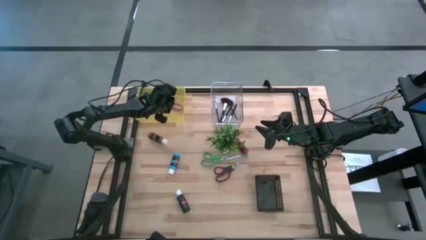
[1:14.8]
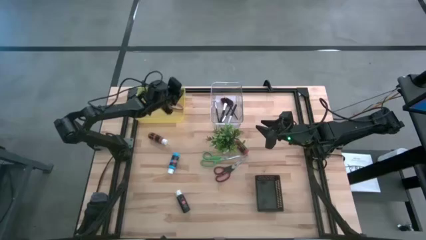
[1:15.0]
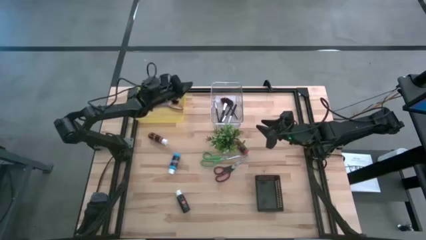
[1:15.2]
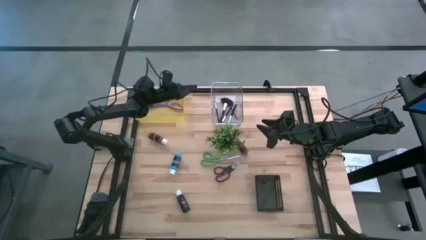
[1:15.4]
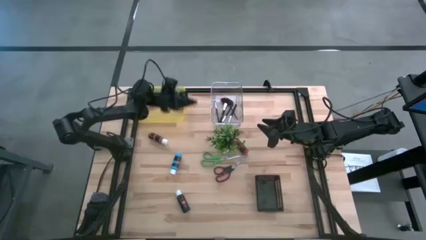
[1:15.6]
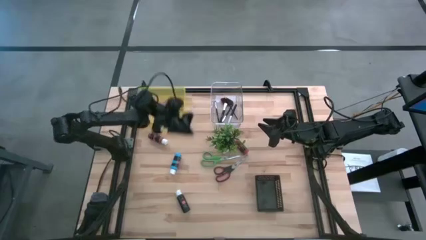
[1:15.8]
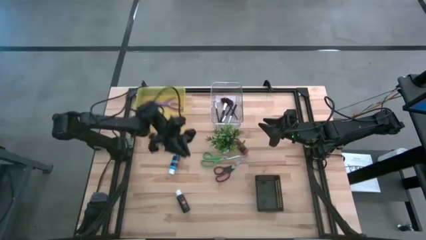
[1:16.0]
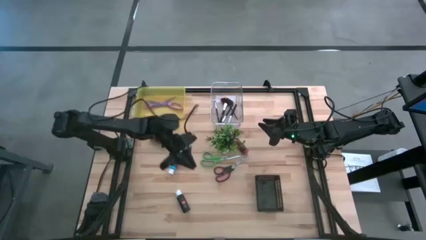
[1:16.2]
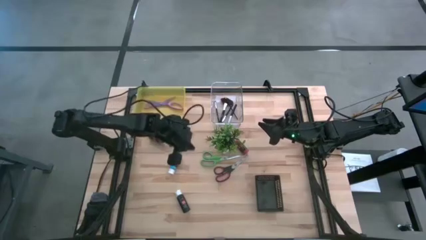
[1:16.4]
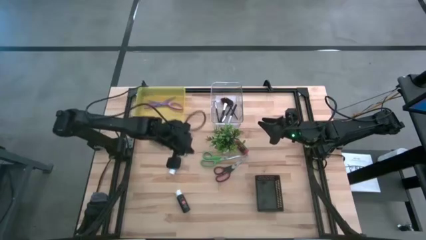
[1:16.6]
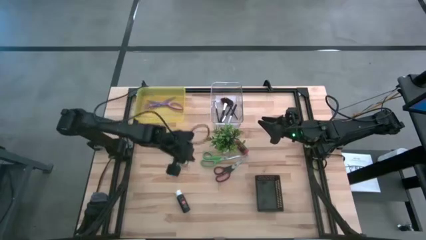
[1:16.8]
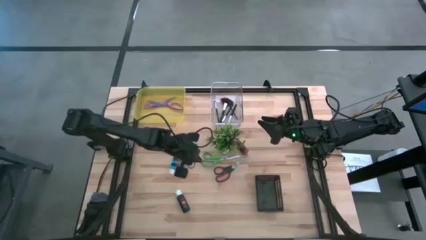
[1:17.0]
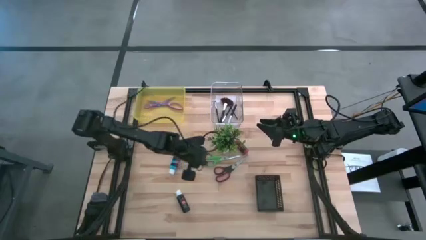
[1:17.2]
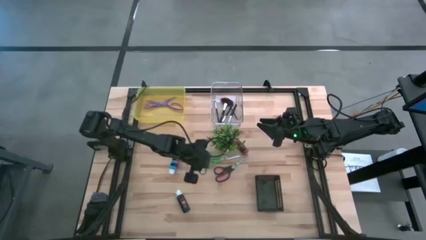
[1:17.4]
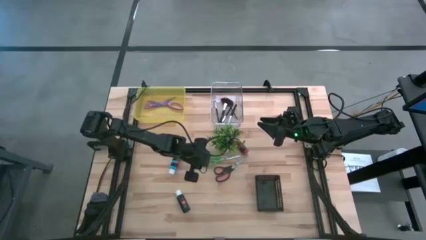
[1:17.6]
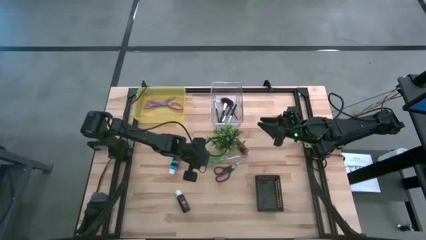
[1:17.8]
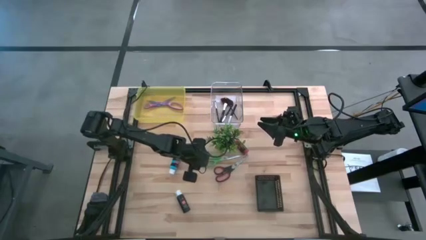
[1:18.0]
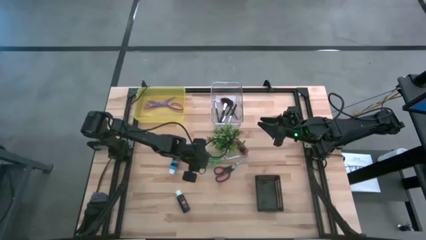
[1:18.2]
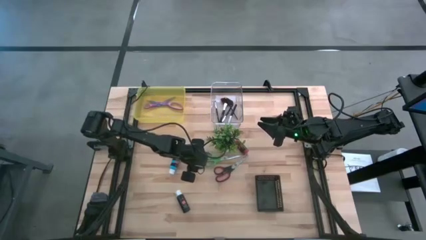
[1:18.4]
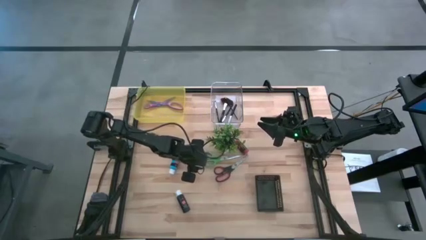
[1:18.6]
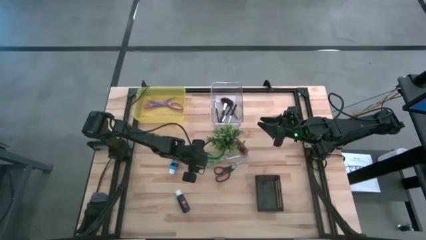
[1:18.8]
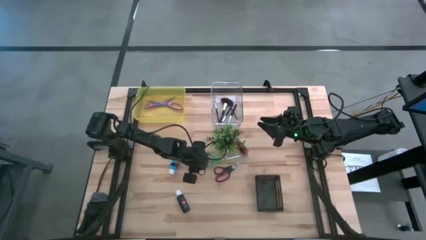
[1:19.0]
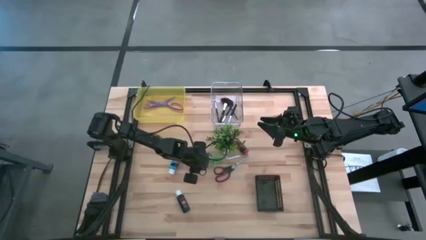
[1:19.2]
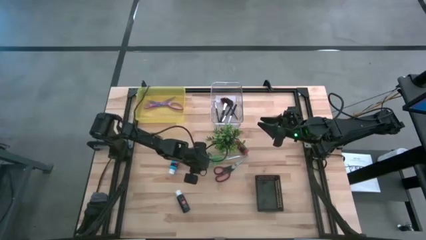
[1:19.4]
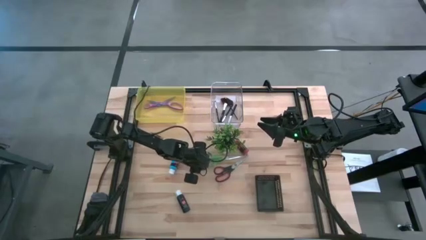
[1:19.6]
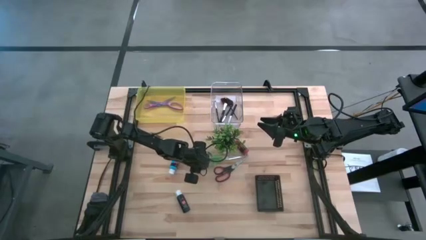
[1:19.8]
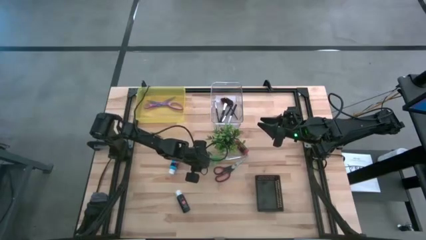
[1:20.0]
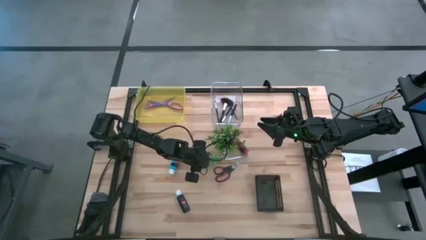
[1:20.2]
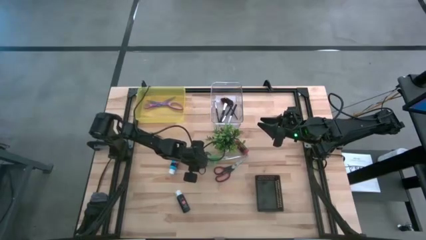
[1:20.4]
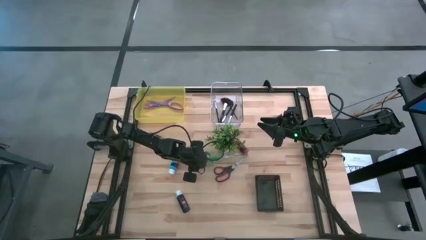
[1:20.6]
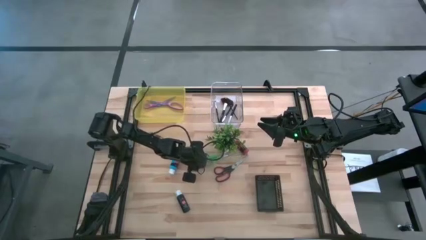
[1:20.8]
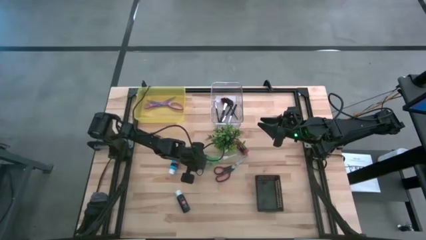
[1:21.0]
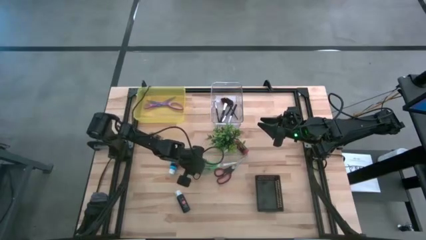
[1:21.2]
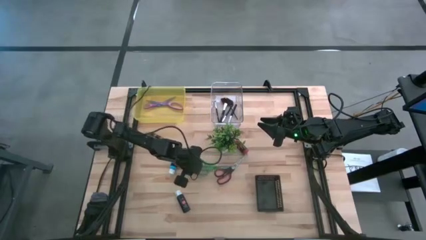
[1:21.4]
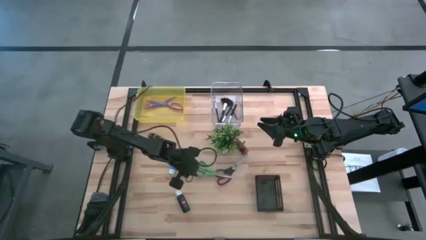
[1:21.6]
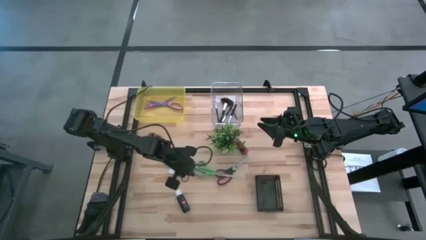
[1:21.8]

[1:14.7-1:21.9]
Task: Pick & Place Paint Supplies
Put the green scissors into the yellow bin

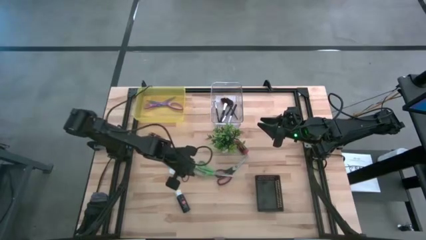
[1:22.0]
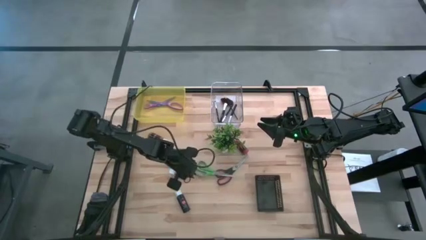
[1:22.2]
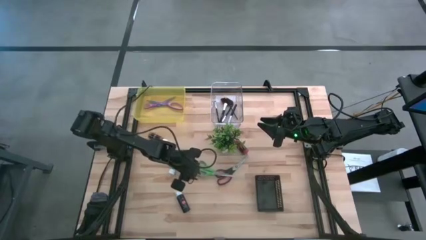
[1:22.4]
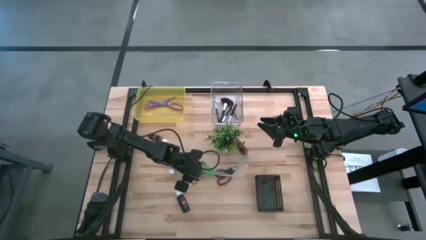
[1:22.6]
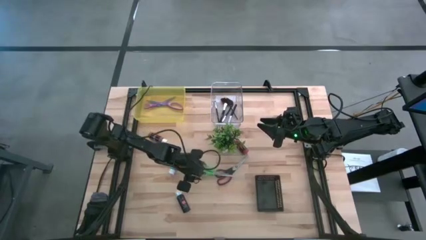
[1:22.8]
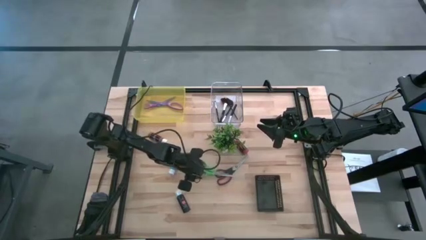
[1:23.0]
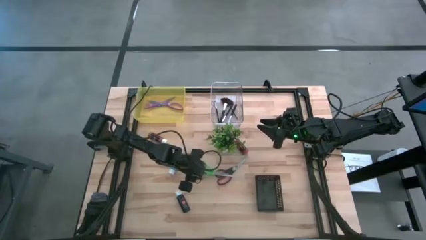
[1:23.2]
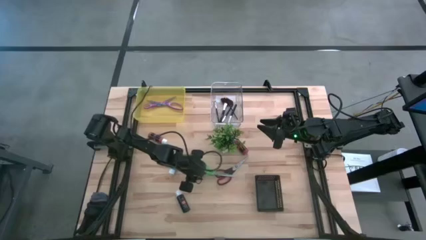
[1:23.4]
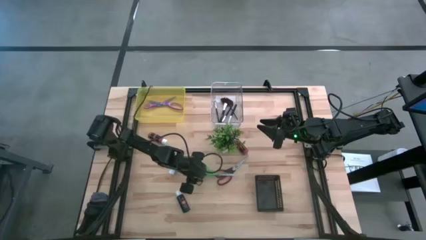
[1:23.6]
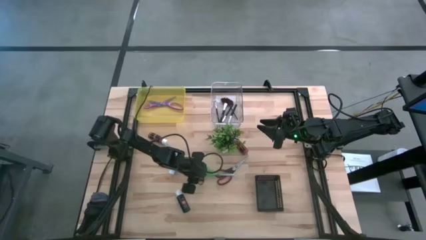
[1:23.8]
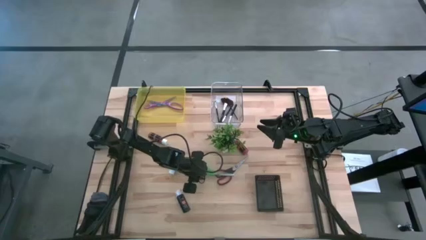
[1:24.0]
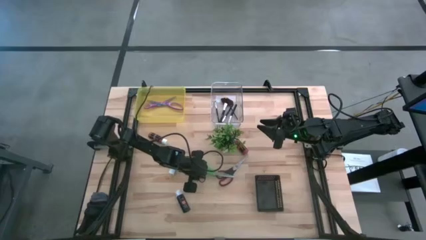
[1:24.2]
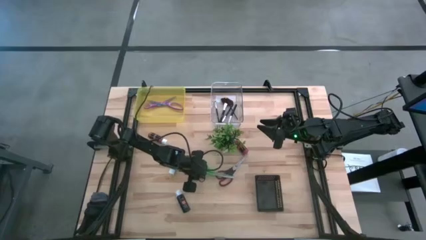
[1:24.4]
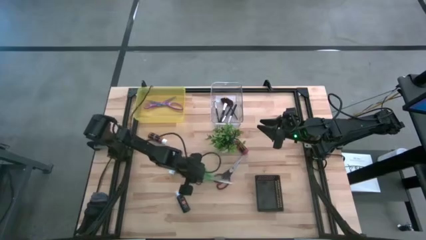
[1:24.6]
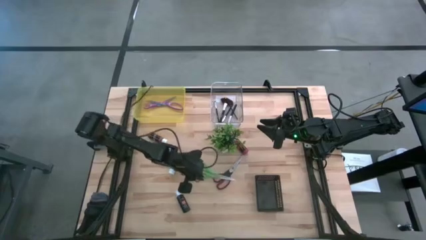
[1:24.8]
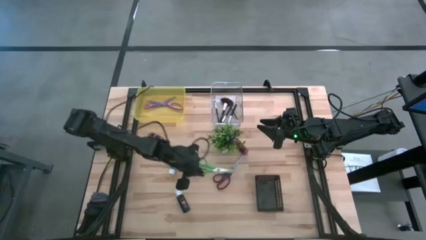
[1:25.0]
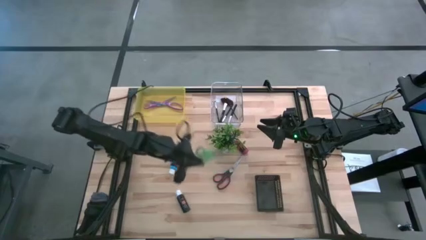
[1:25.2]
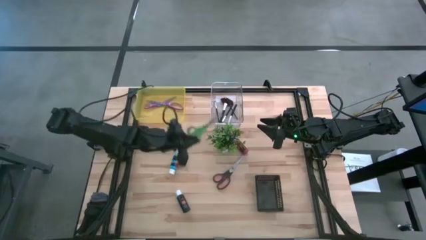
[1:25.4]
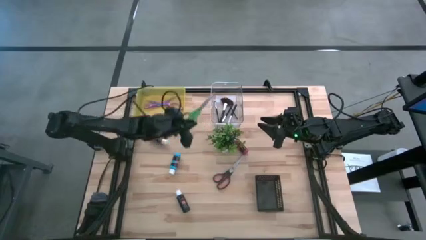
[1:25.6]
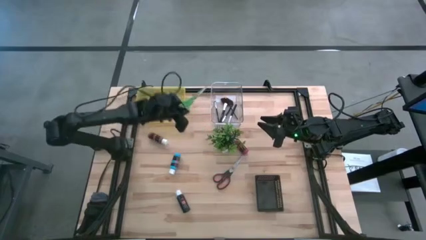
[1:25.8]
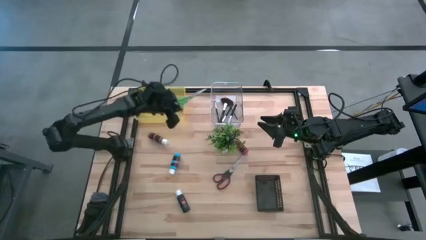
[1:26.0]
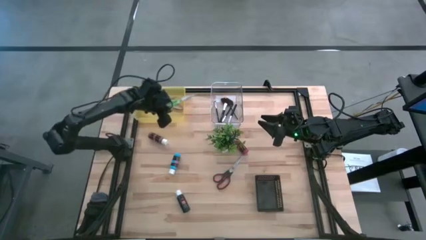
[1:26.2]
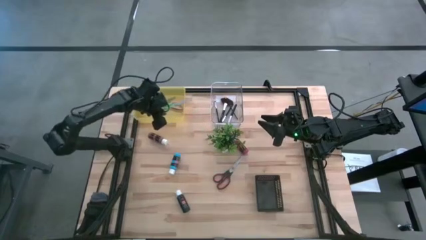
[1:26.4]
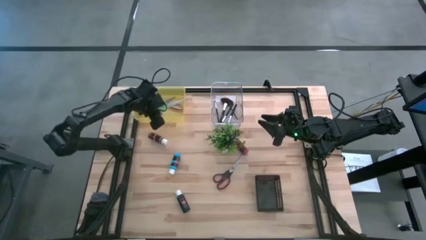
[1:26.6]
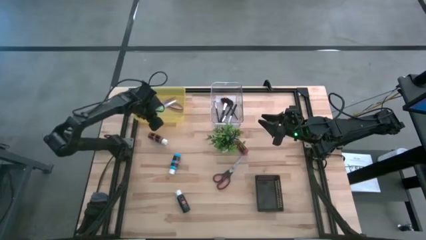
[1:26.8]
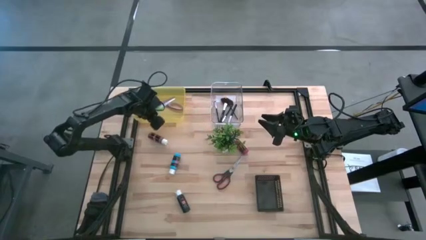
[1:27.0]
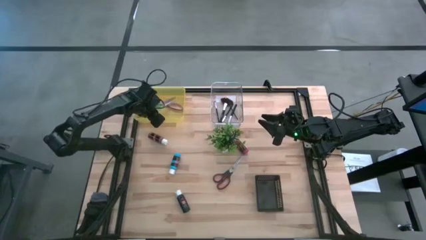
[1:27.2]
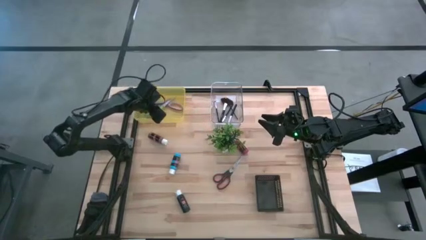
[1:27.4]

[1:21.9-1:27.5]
Put the green scissors into the yellow bin
